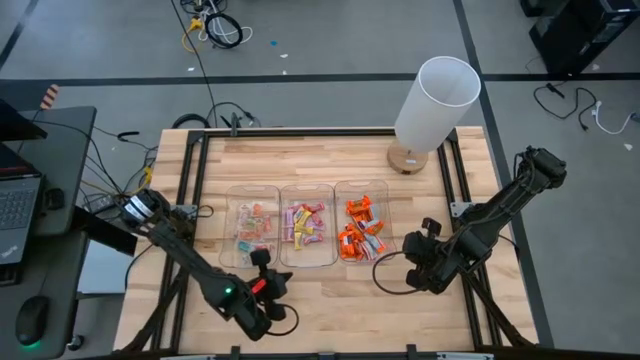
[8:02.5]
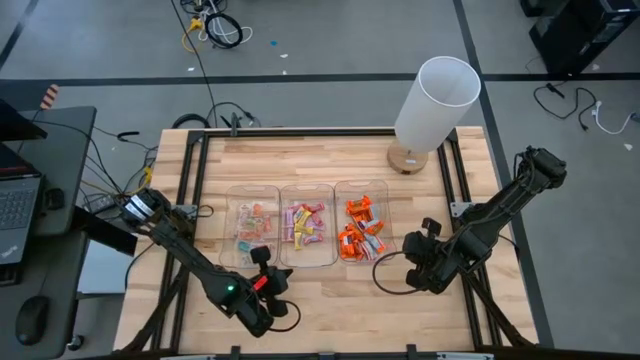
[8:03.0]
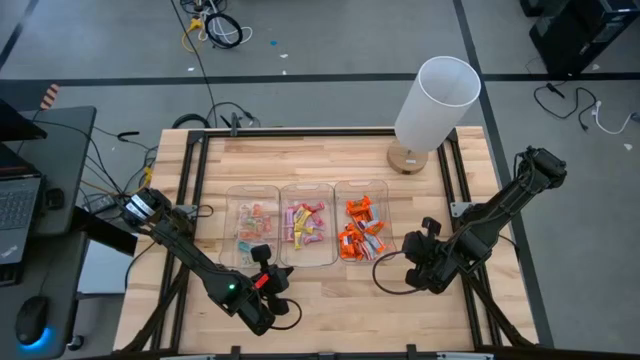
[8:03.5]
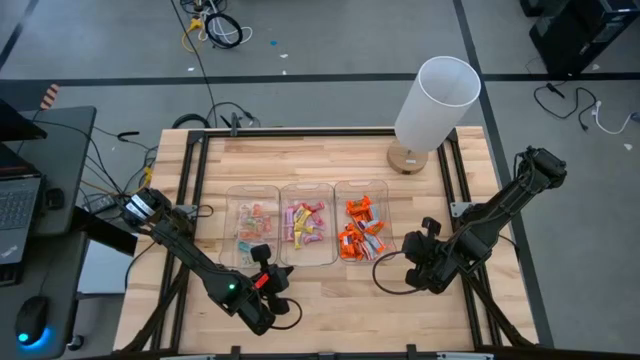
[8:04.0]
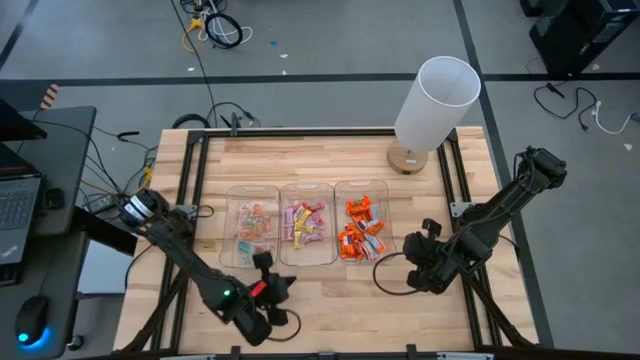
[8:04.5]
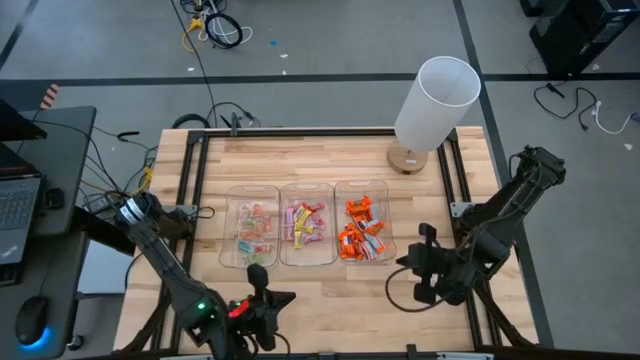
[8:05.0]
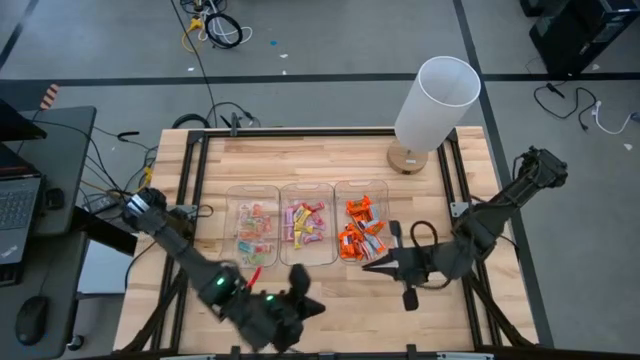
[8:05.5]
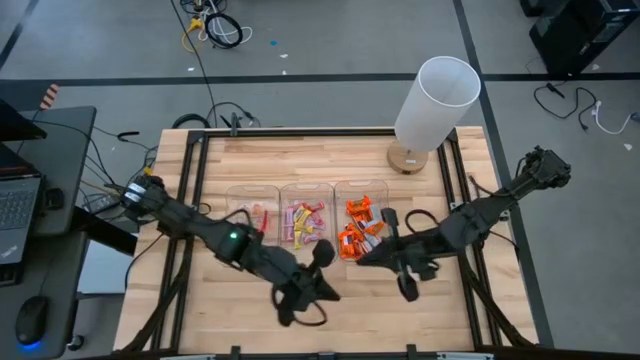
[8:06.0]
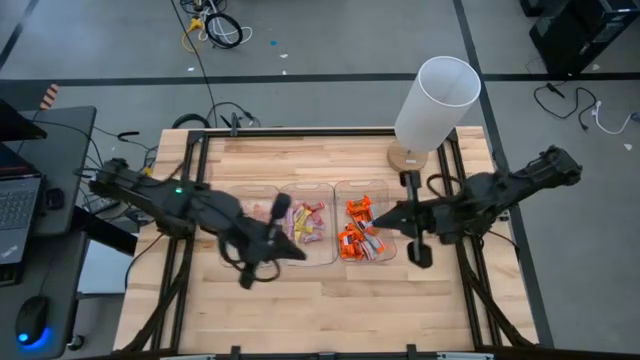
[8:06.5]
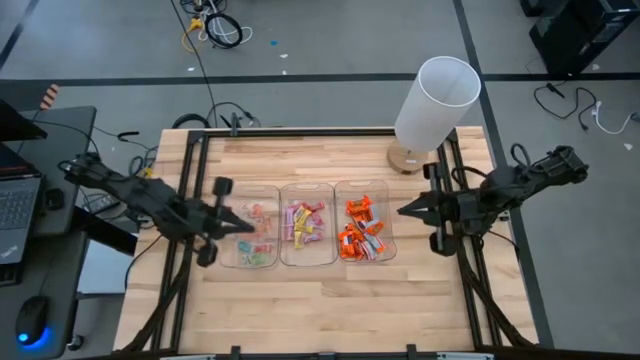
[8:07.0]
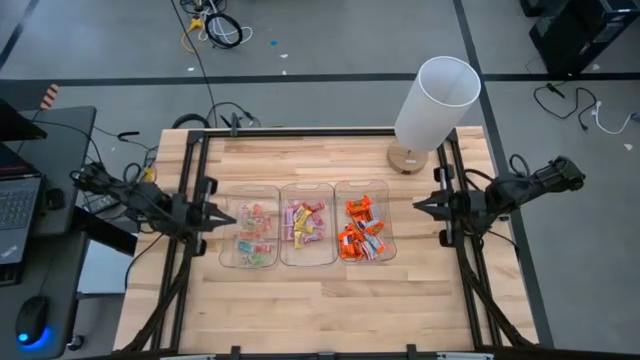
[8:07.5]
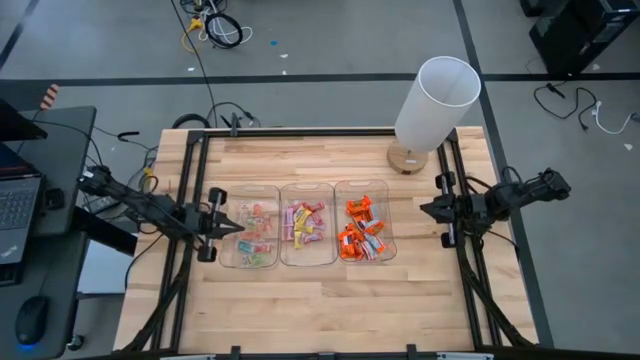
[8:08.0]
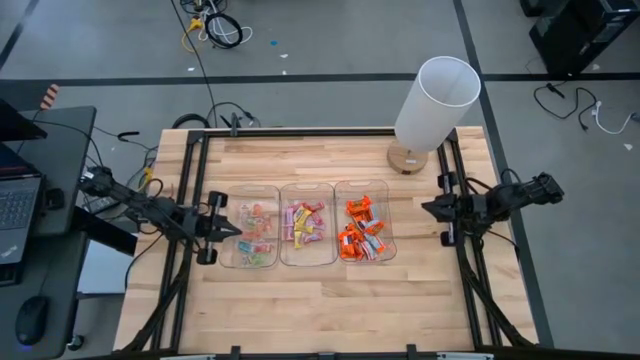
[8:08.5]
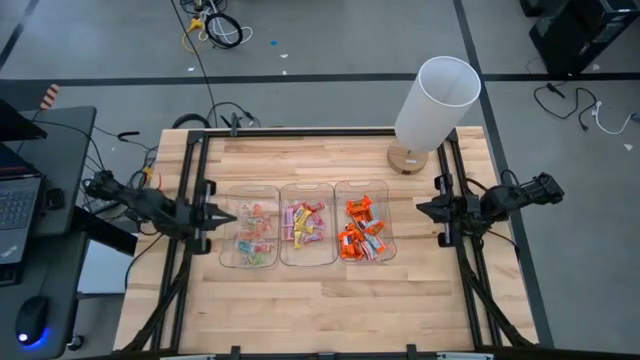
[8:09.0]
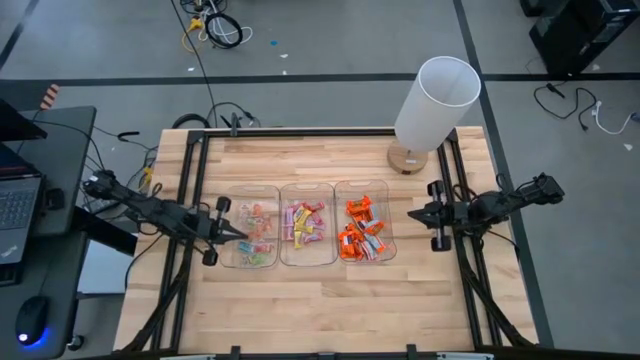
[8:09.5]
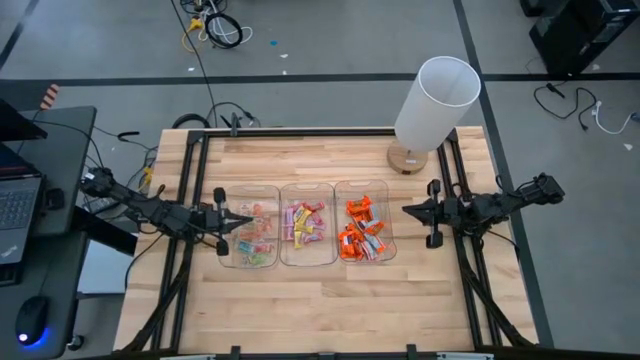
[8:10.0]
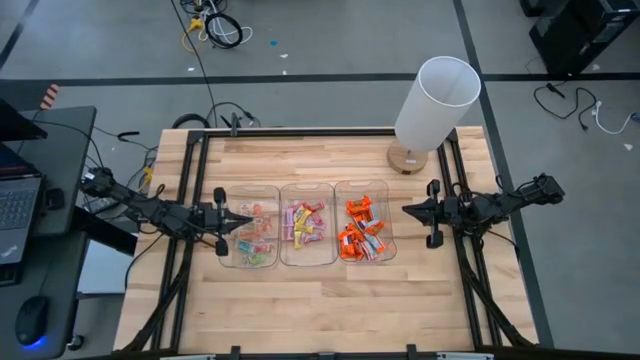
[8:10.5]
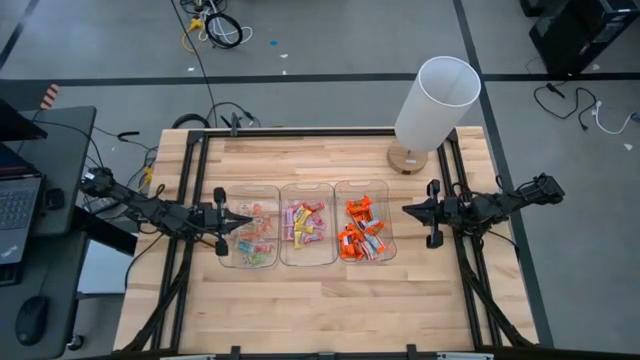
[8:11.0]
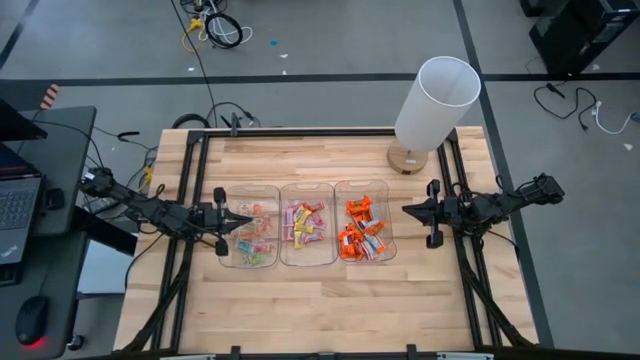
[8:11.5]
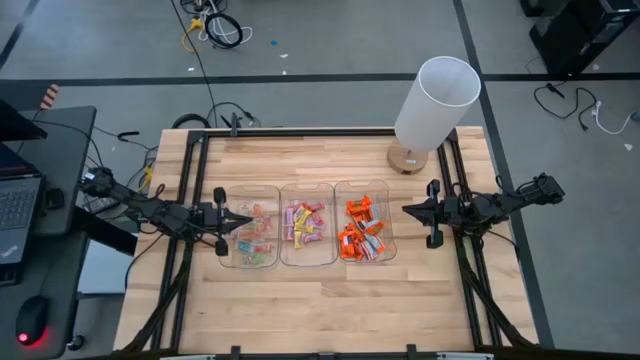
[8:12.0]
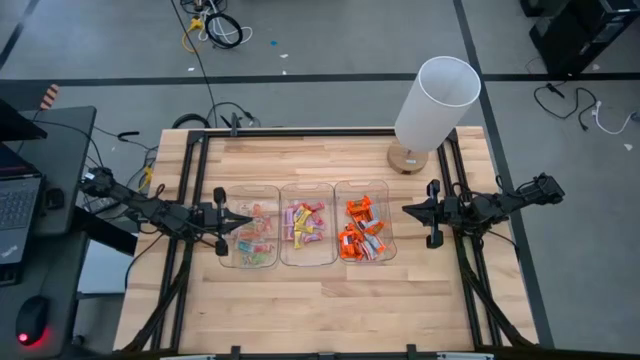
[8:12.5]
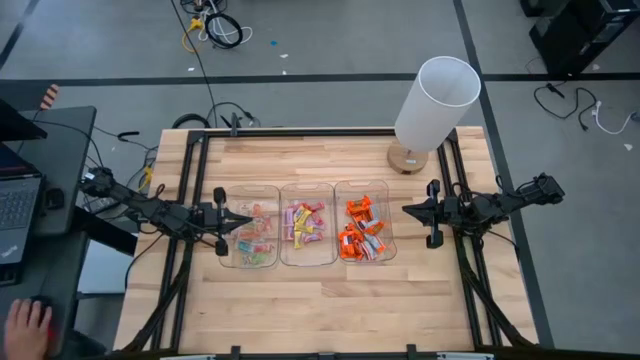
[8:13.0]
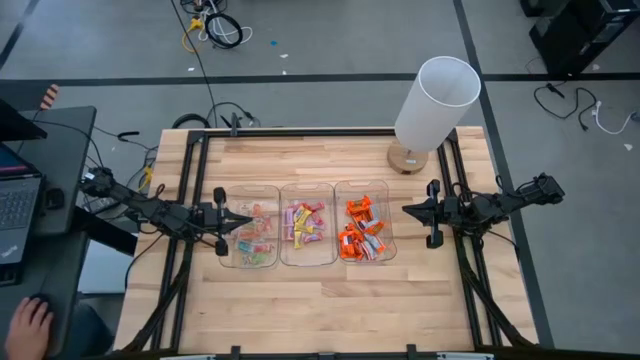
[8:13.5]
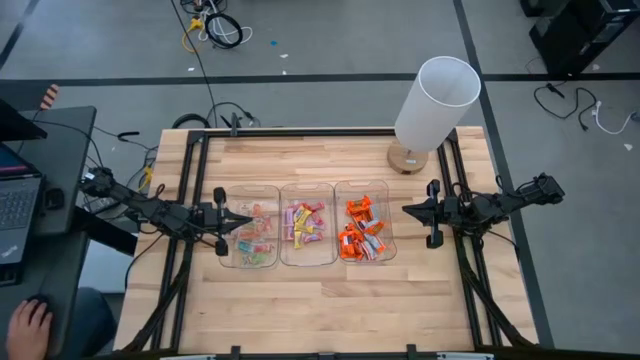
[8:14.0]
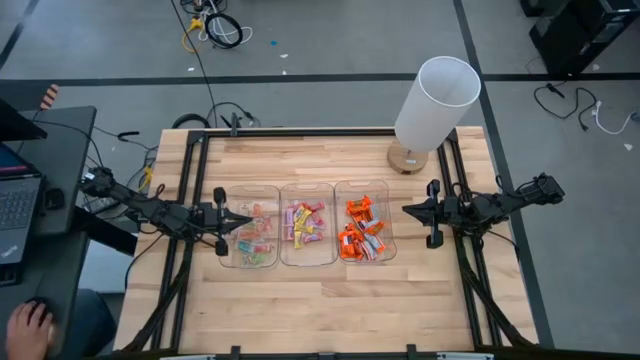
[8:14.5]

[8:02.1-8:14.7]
Task: Sort candy
Return to Home Position

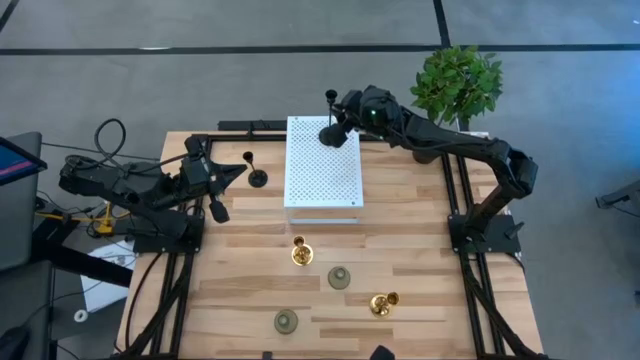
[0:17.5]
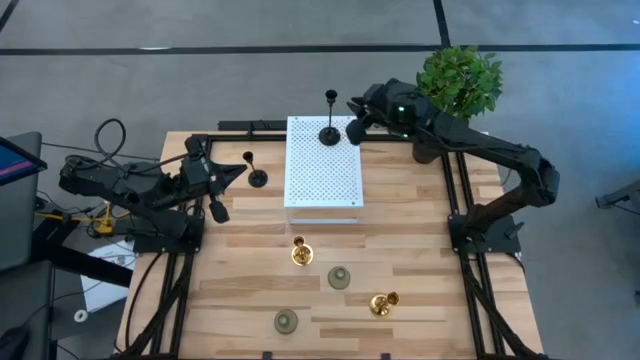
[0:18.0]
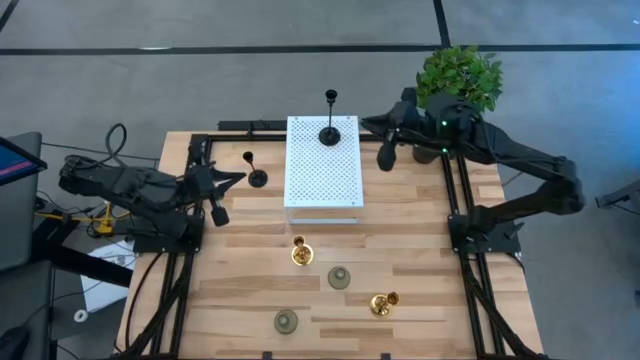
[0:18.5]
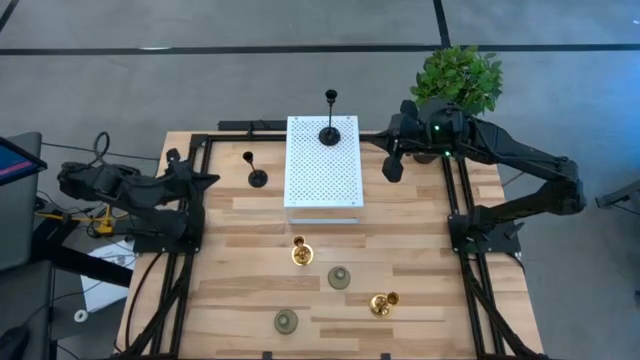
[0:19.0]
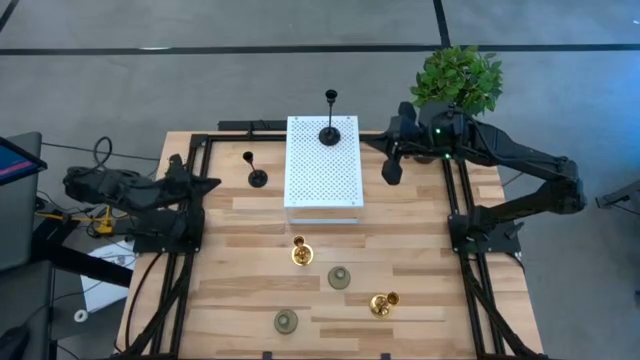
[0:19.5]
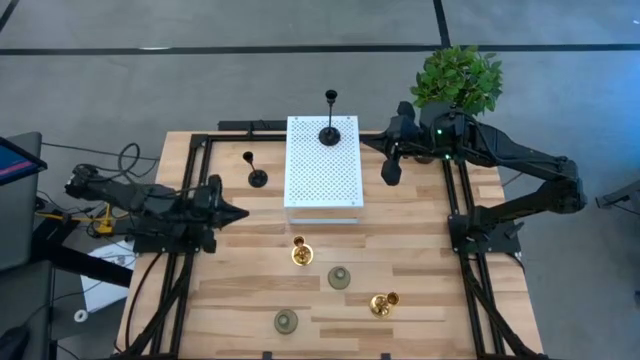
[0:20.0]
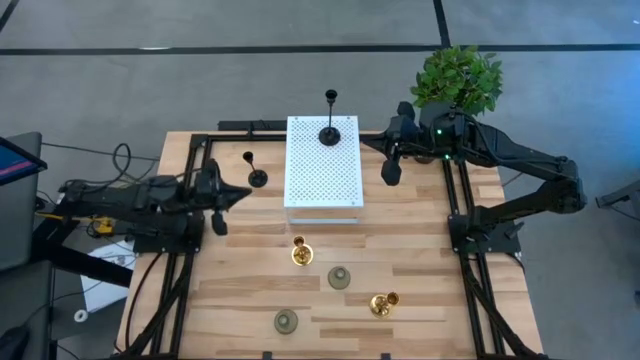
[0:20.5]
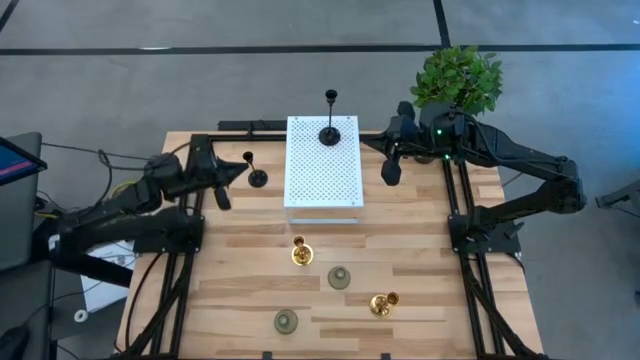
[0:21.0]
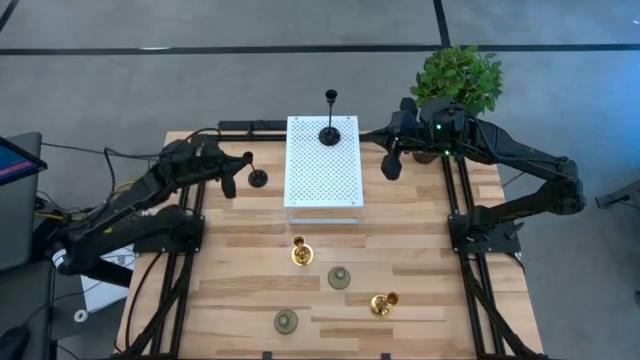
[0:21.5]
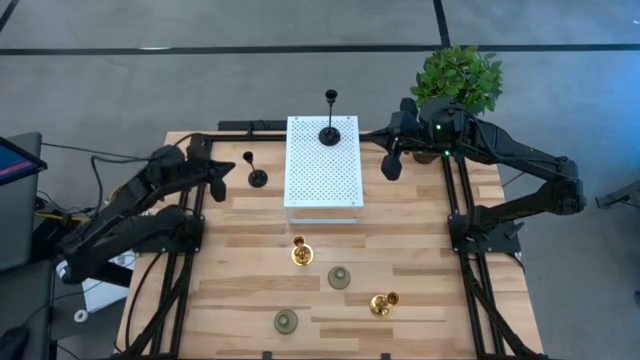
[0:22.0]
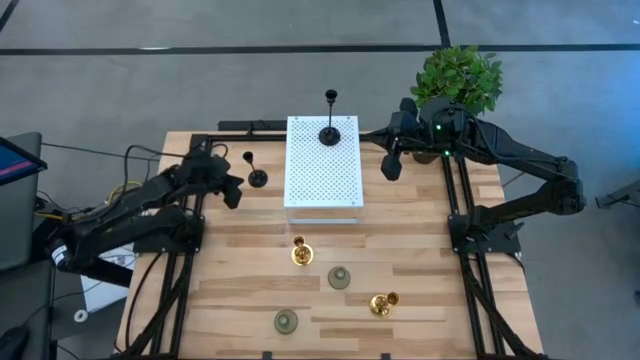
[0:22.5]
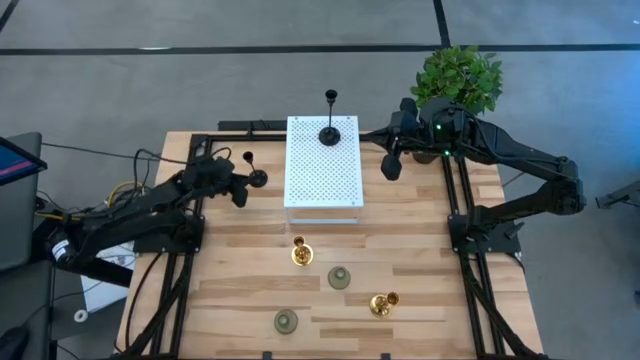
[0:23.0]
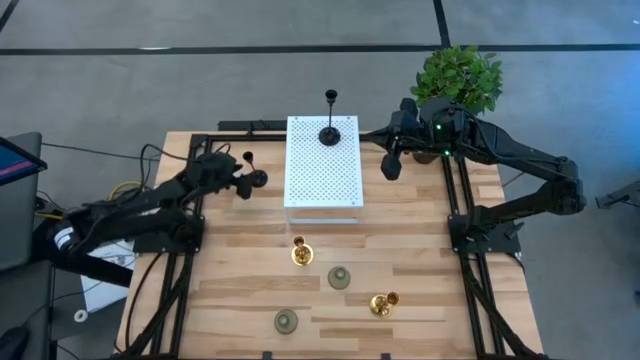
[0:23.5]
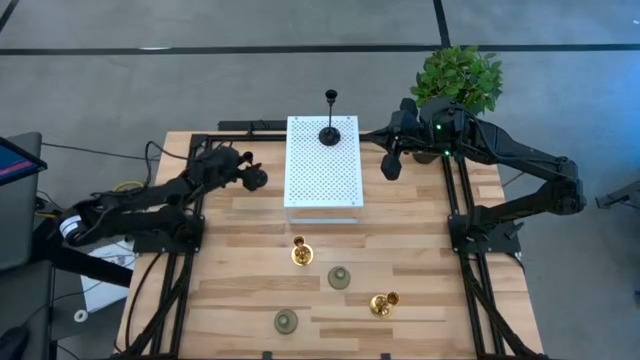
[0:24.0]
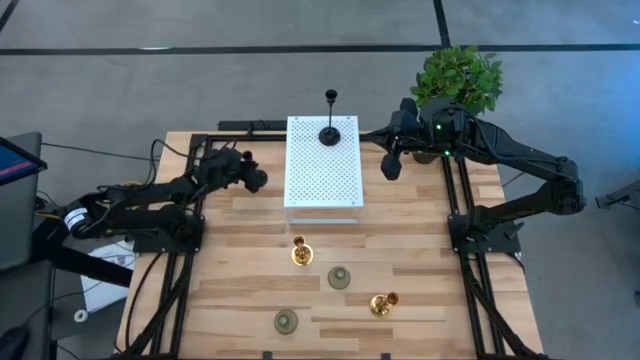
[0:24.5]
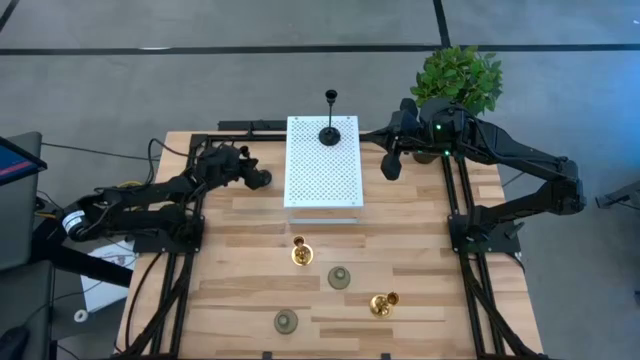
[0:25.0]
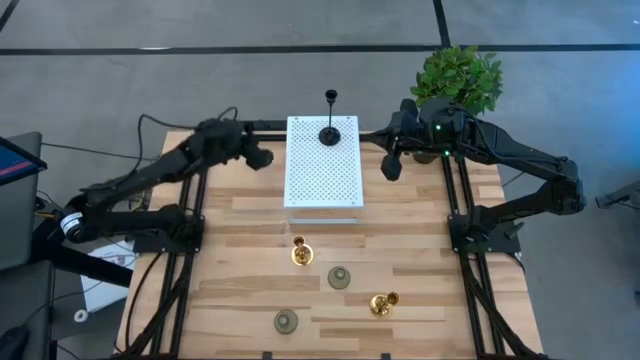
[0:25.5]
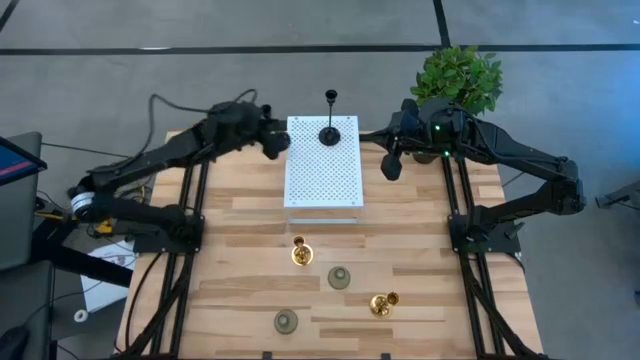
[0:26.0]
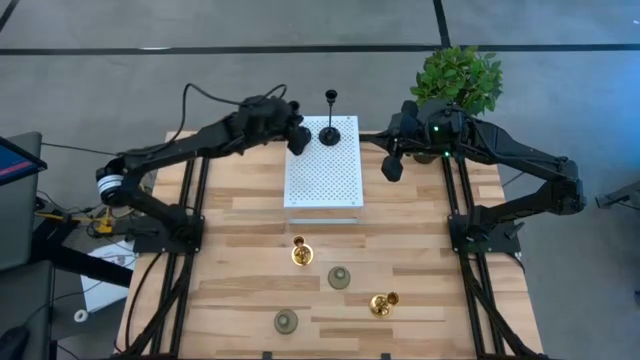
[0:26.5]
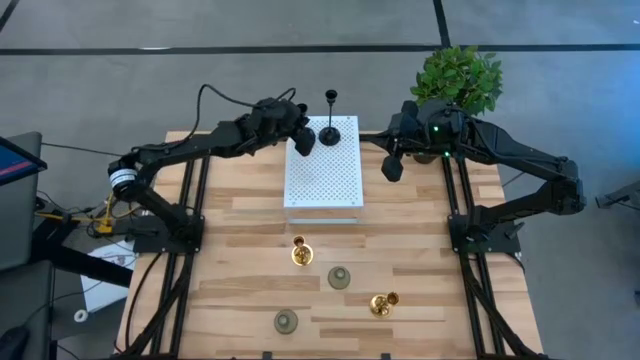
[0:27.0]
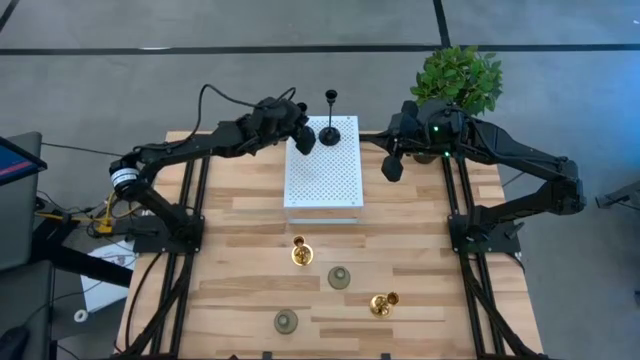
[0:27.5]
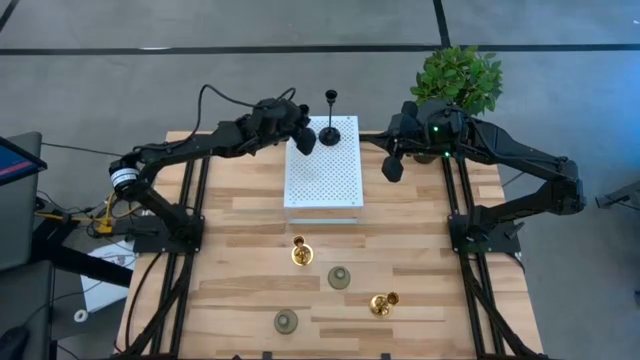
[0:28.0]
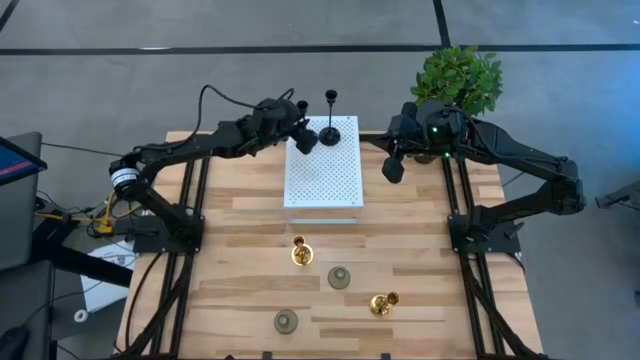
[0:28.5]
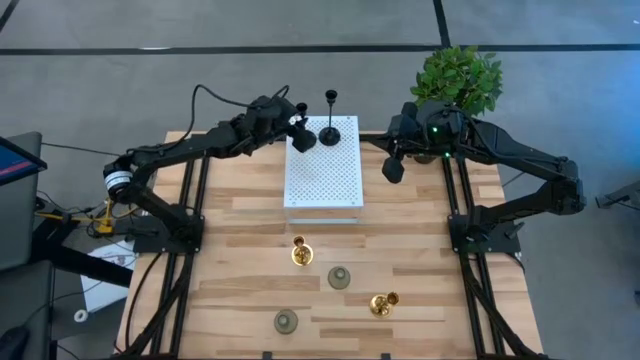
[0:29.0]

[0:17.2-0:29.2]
Task: Pick & Place candle stick holders
Put the black candle holder aligned with the other black candle holder on the shelf
